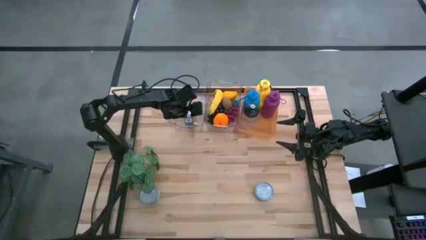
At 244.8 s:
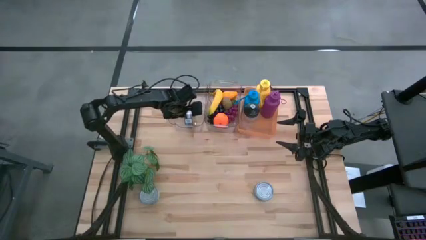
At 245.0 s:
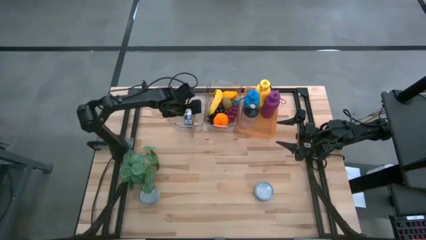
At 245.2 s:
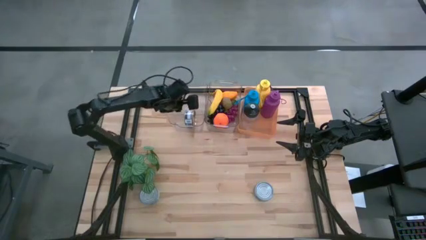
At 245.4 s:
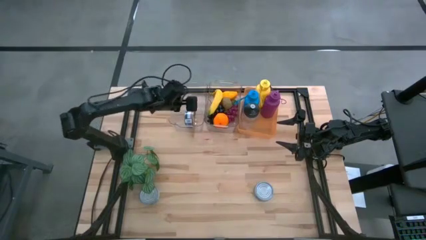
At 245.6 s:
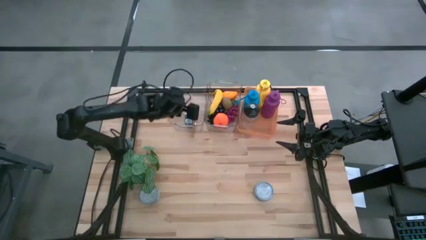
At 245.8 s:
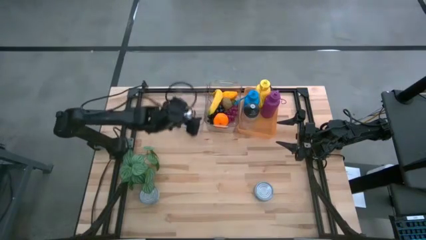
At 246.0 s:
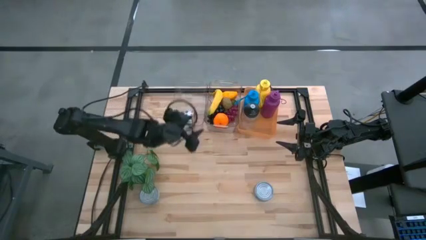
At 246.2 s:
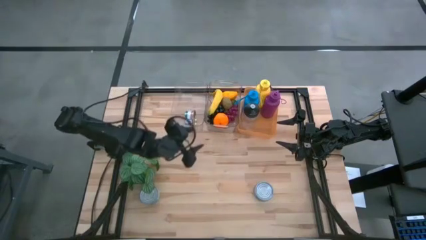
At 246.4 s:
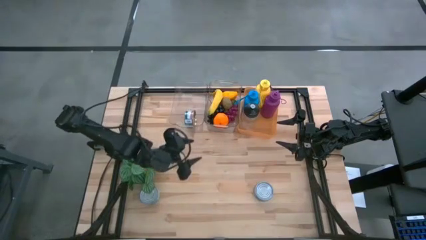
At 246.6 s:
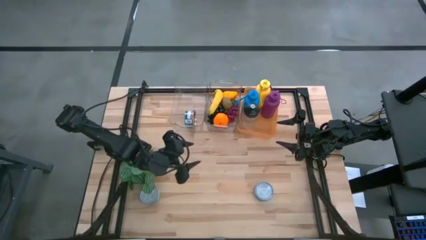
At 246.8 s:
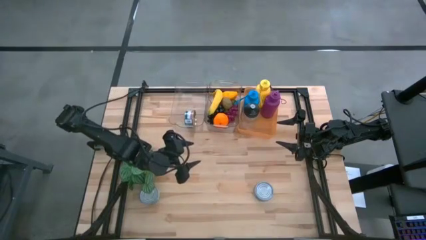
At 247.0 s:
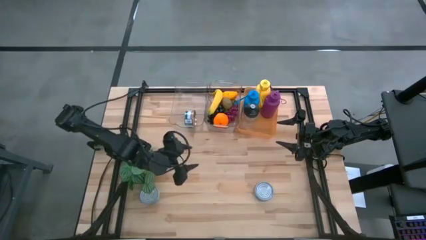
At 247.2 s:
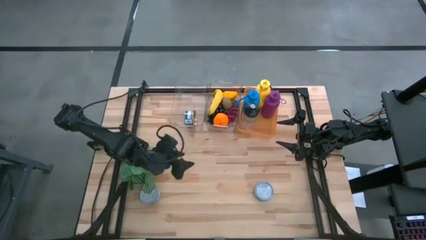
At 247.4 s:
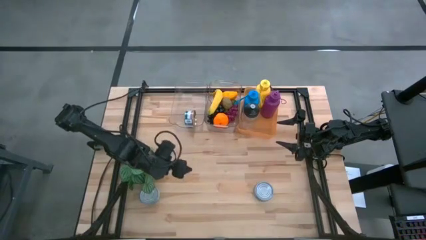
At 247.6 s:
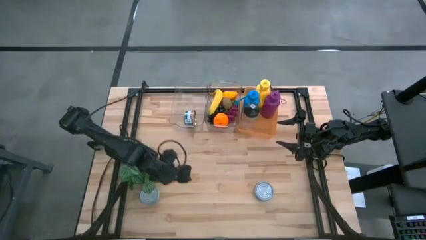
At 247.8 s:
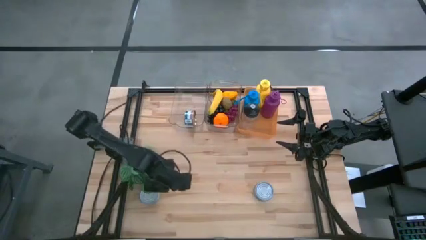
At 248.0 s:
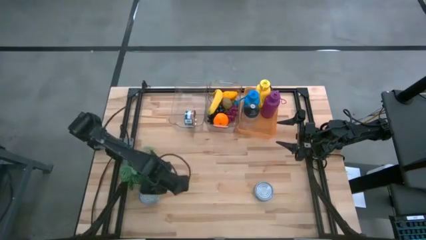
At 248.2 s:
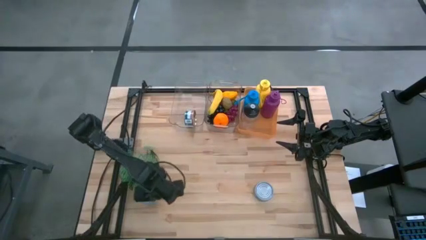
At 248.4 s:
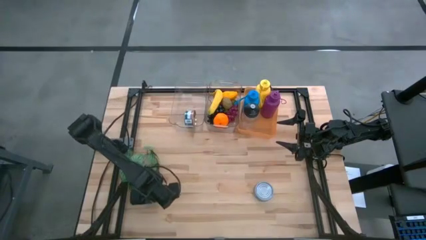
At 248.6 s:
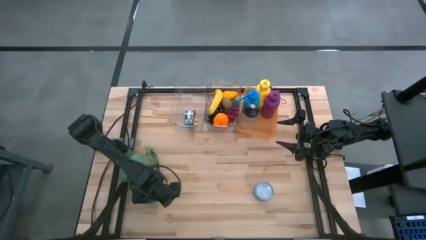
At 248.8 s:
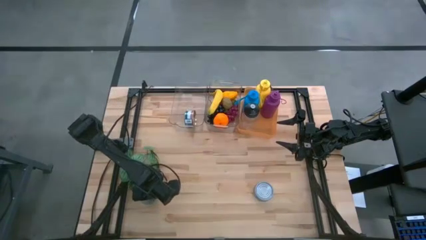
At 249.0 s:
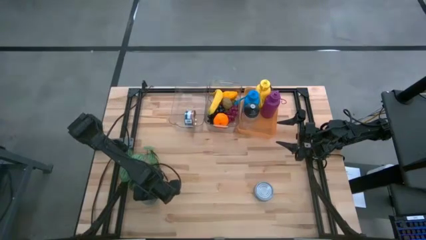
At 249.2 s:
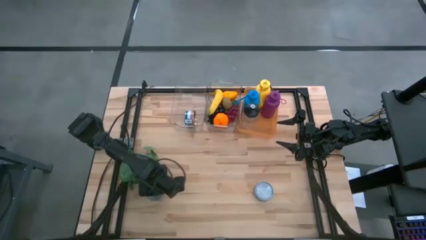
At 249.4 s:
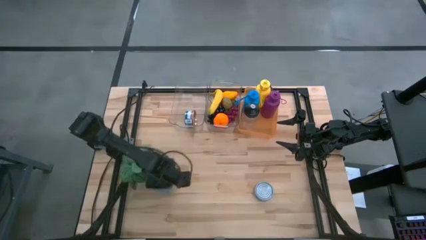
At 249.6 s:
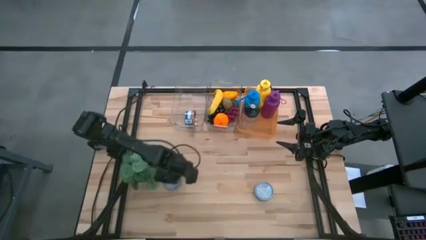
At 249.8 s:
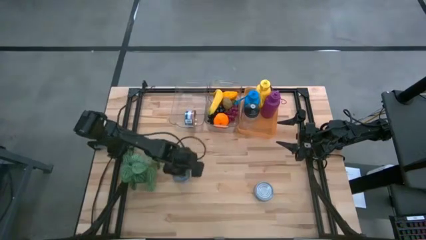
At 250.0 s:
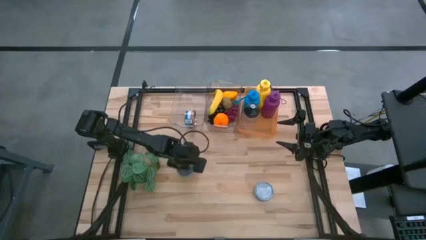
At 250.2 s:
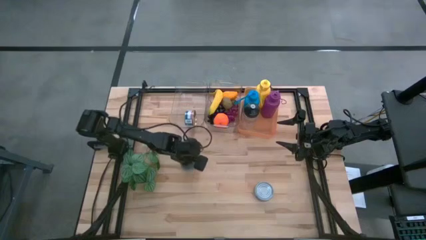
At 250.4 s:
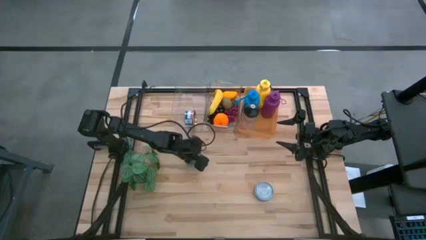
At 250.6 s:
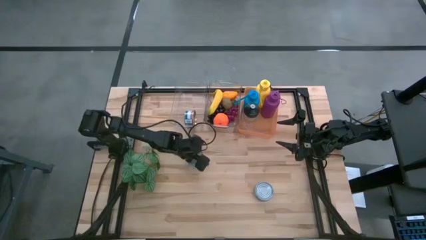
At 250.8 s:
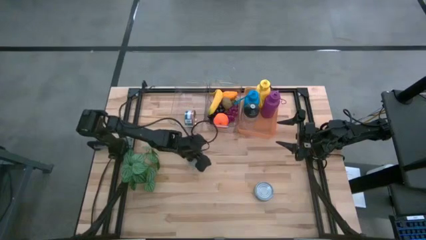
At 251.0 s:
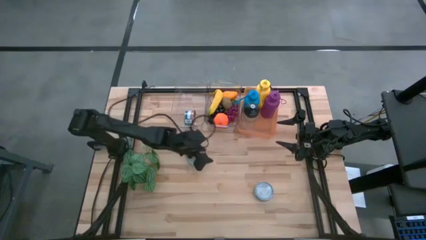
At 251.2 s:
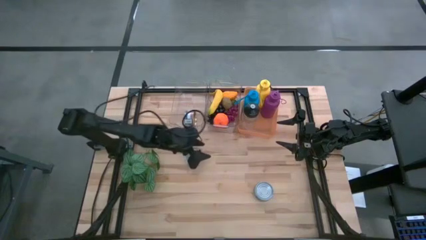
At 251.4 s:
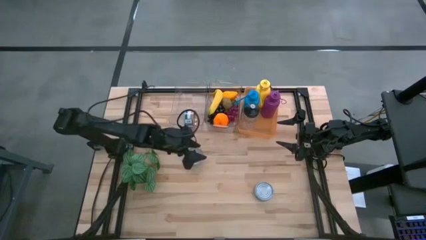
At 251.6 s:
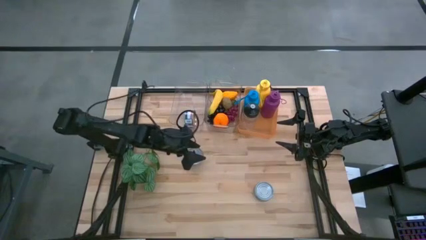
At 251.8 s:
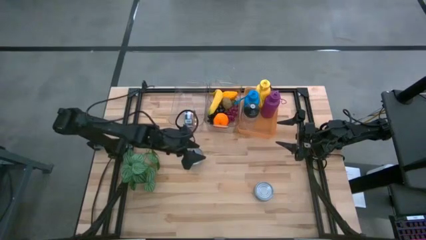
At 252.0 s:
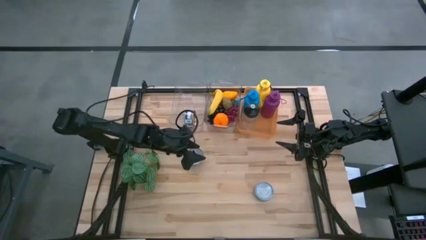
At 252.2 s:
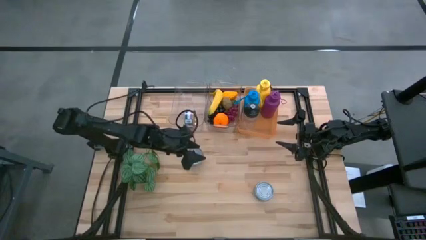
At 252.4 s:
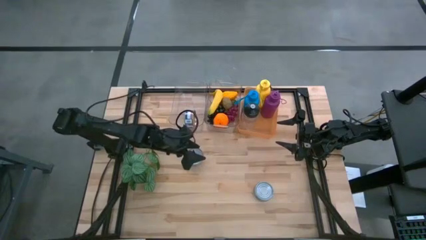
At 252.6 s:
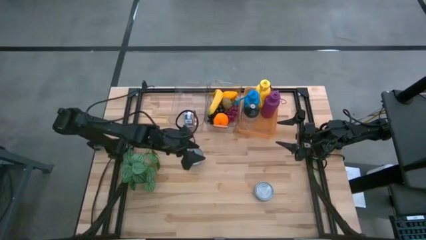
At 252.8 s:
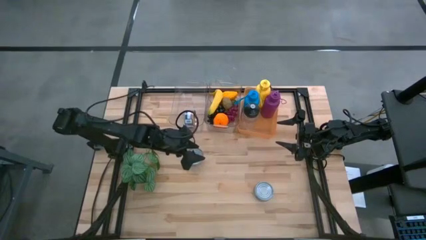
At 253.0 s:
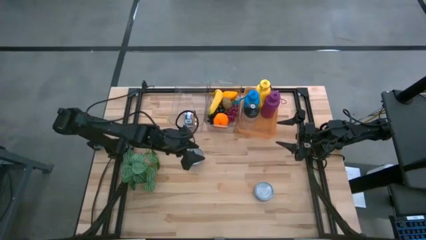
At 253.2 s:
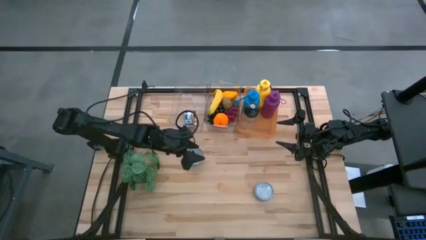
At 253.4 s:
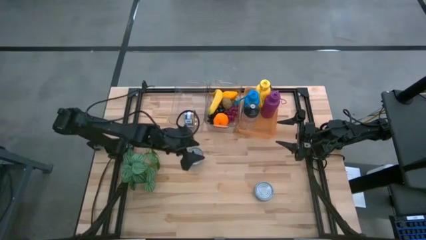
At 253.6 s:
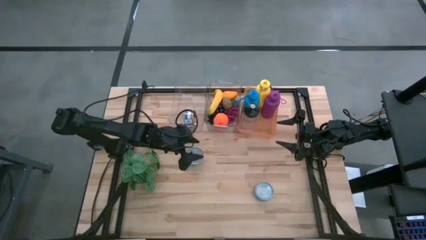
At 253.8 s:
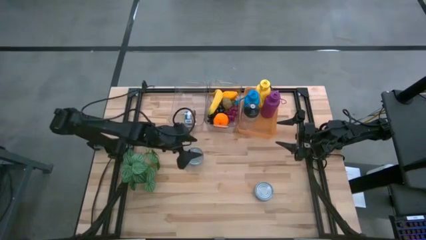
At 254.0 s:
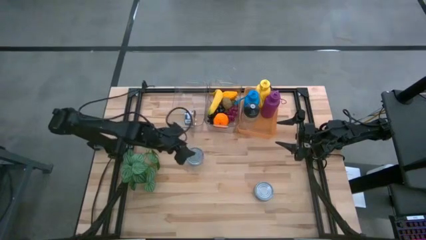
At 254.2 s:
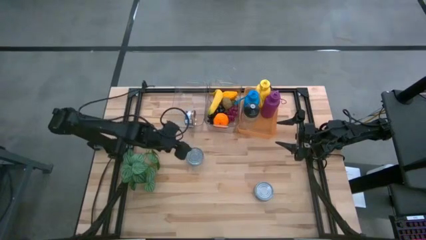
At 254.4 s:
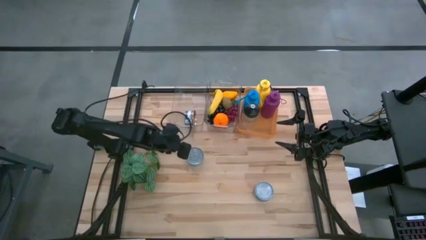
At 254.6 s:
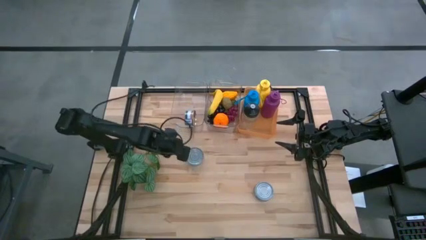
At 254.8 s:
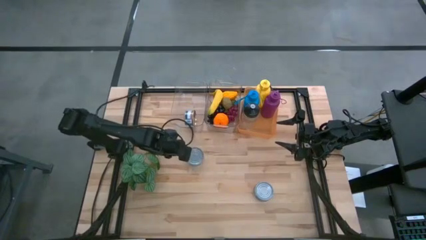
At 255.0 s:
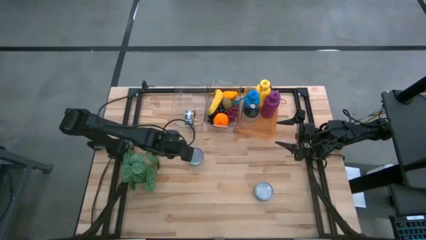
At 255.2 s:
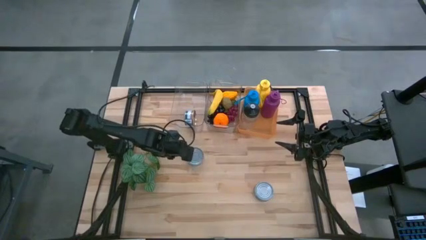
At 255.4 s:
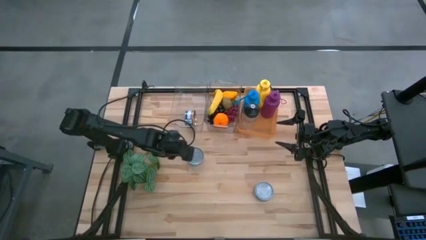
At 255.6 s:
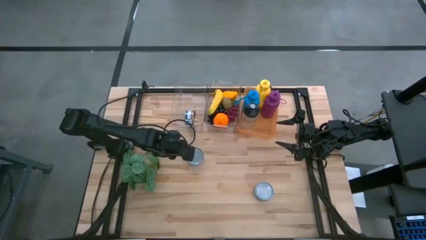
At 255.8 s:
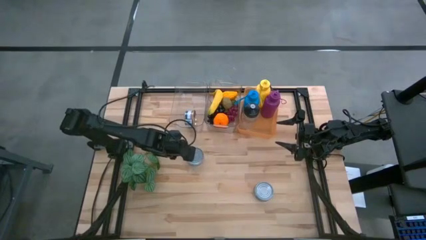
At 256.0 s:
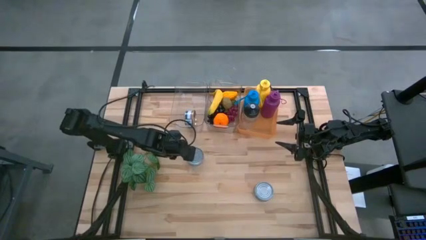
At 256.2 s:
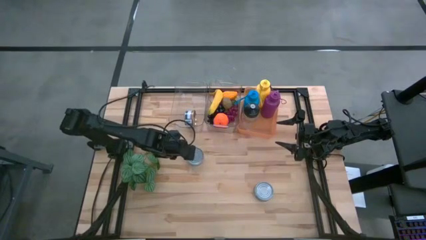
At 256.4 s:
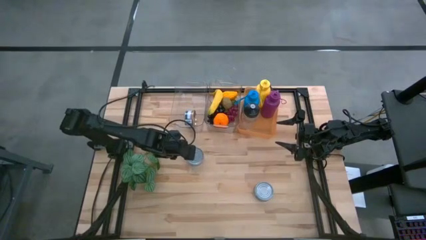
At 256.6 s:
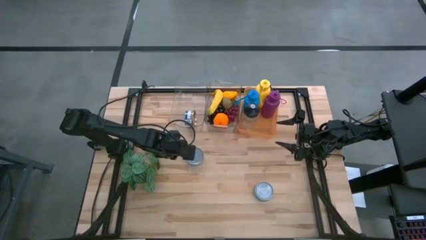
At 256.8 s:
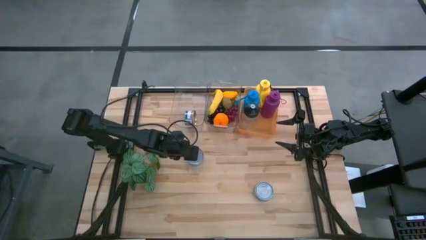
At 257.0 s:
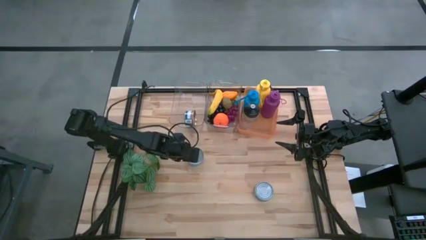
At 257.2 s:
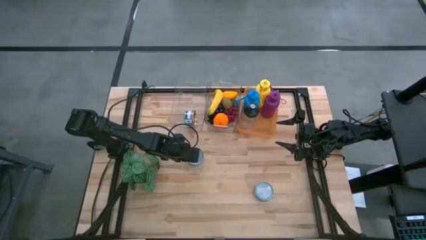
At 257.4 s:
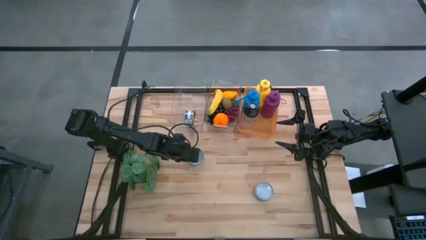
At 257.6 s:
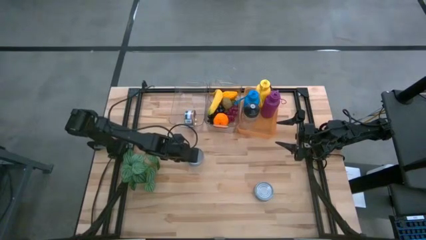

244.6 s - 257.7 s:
Task: Pick & Place Food Item
Put the yellow and blue tuna can into the left transparent bin
